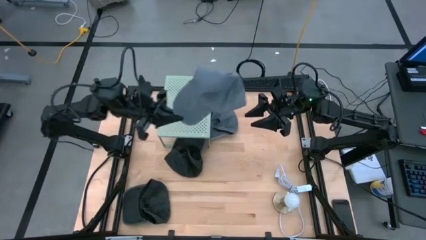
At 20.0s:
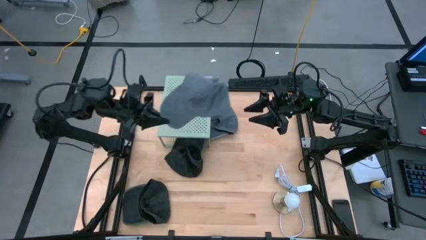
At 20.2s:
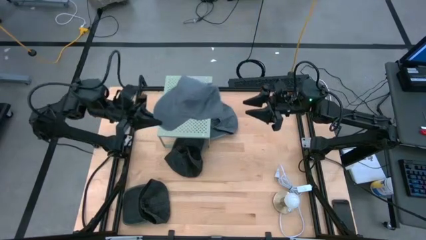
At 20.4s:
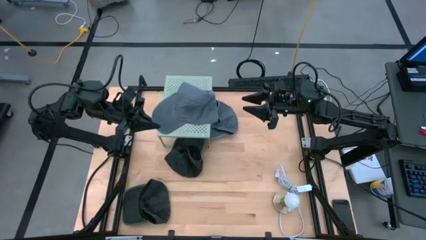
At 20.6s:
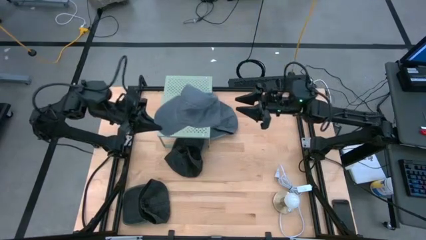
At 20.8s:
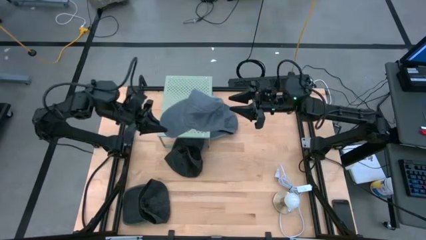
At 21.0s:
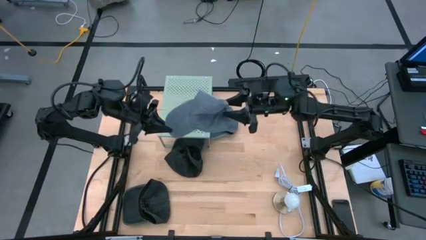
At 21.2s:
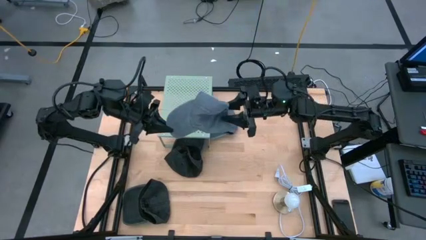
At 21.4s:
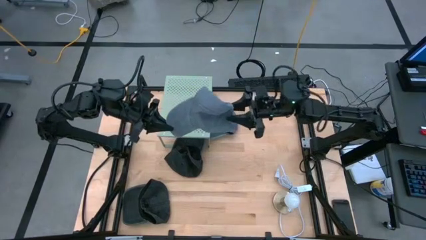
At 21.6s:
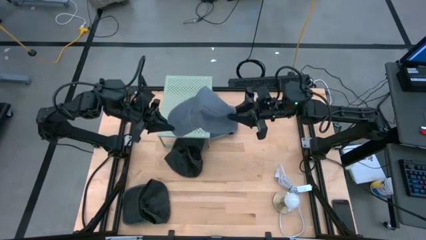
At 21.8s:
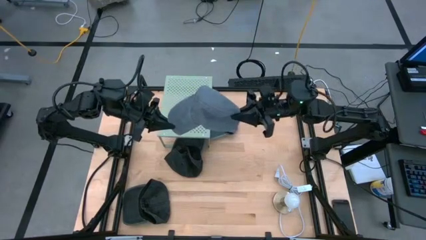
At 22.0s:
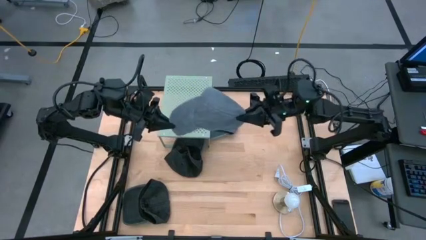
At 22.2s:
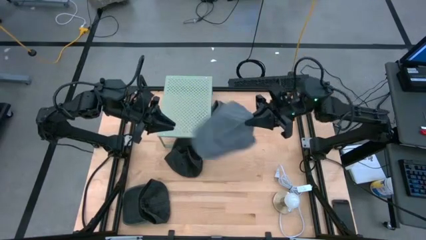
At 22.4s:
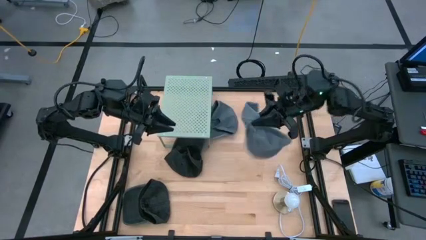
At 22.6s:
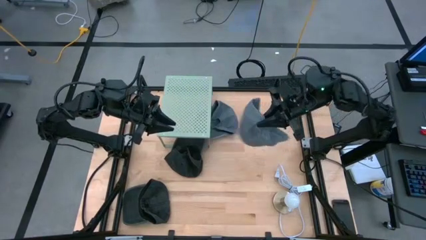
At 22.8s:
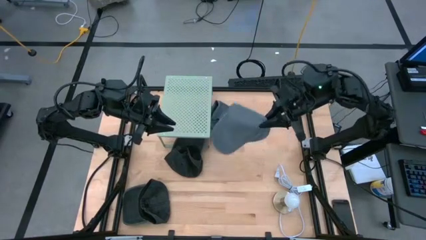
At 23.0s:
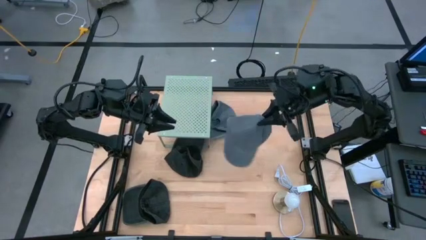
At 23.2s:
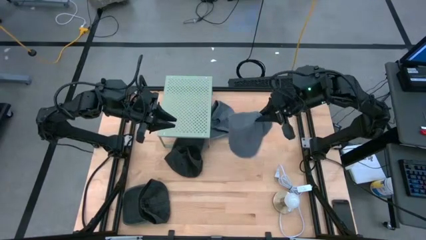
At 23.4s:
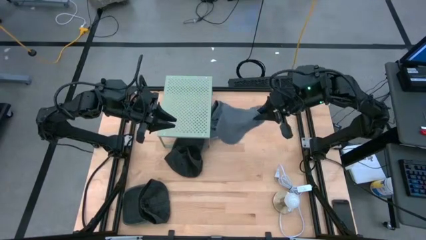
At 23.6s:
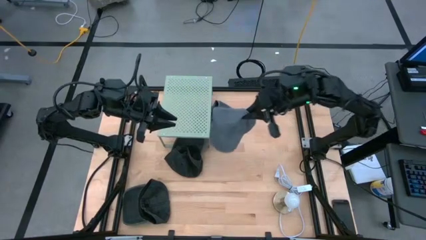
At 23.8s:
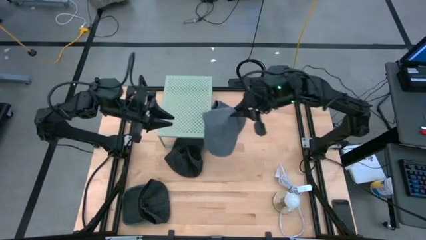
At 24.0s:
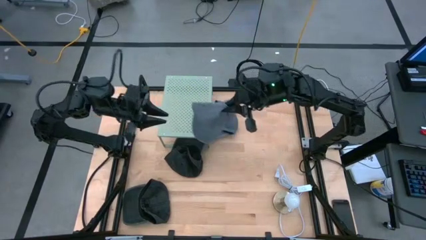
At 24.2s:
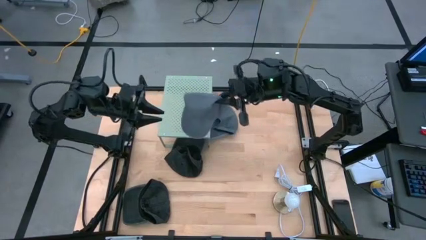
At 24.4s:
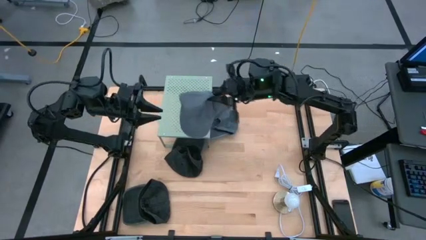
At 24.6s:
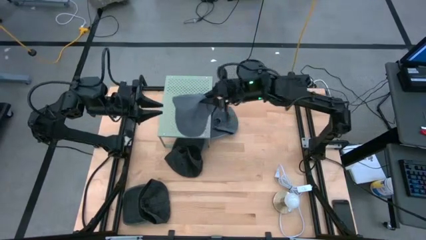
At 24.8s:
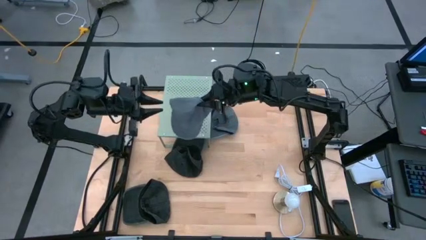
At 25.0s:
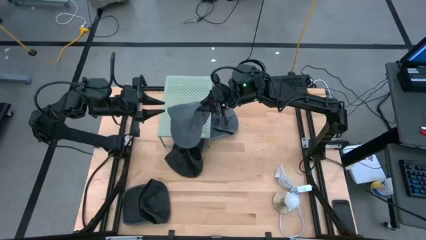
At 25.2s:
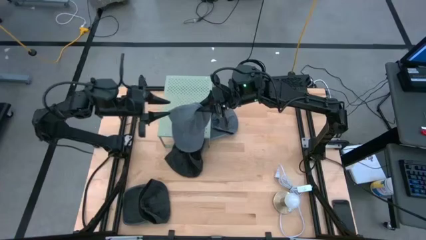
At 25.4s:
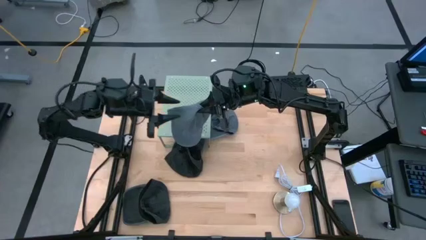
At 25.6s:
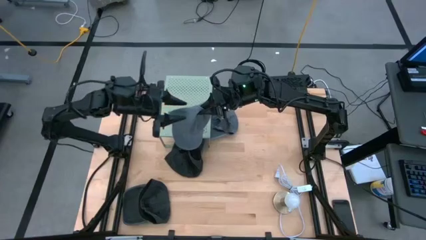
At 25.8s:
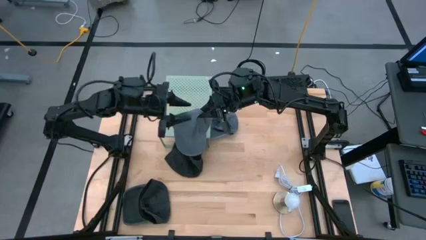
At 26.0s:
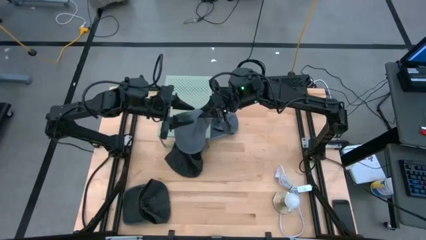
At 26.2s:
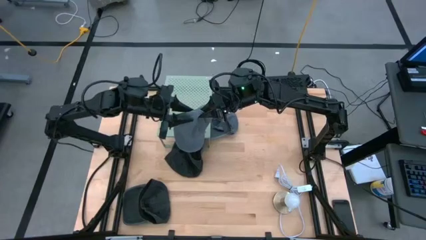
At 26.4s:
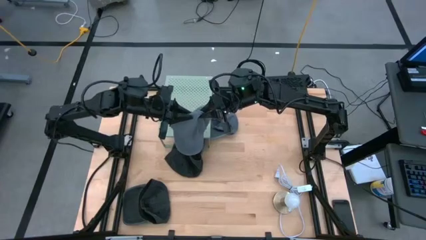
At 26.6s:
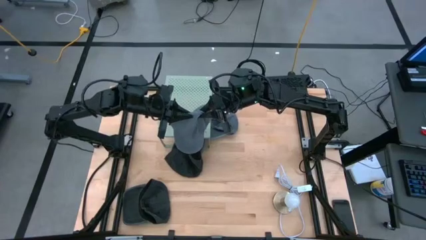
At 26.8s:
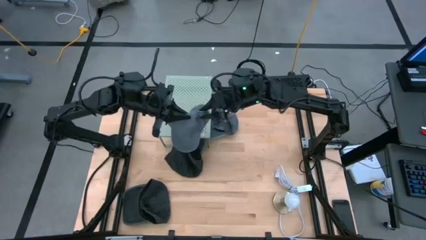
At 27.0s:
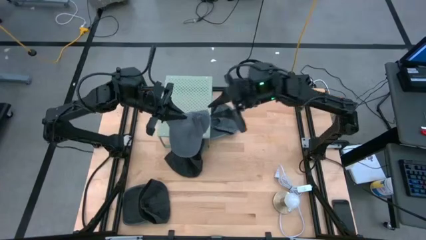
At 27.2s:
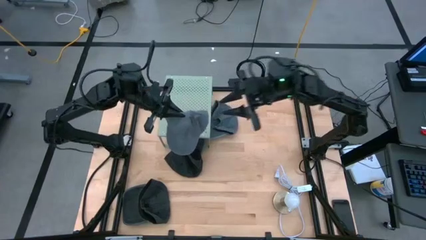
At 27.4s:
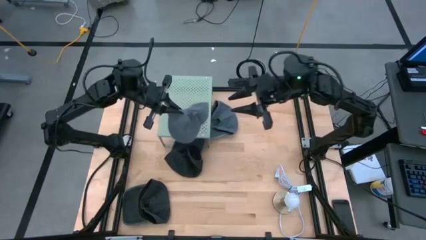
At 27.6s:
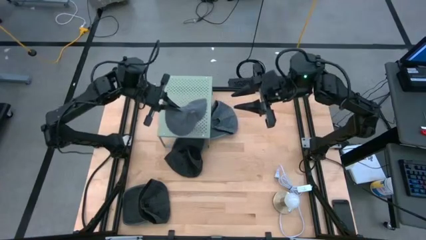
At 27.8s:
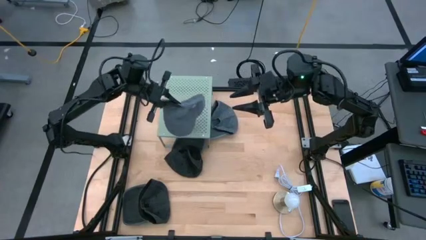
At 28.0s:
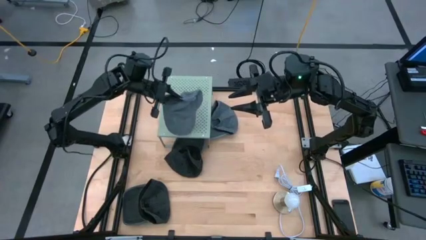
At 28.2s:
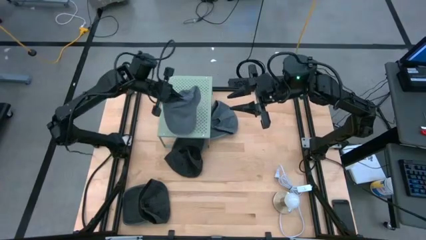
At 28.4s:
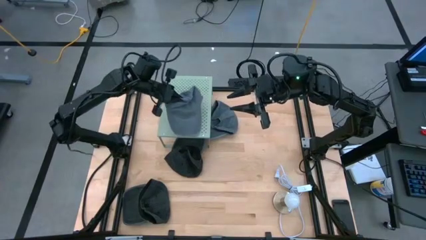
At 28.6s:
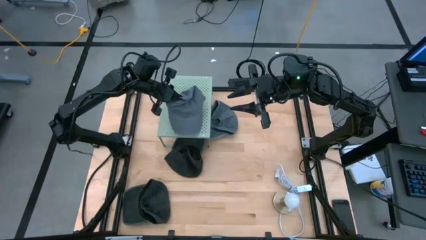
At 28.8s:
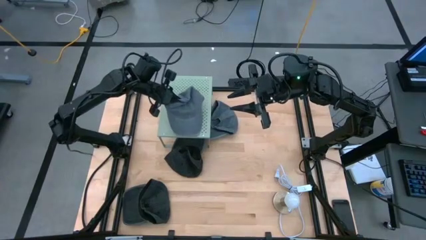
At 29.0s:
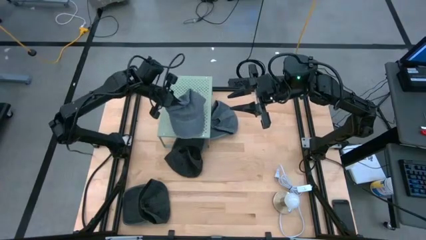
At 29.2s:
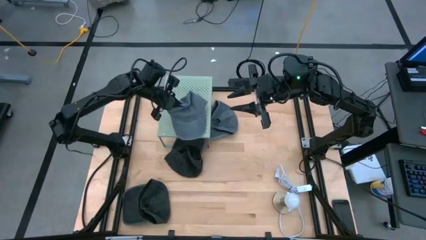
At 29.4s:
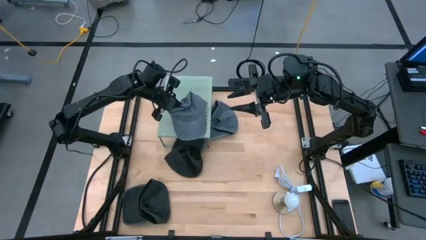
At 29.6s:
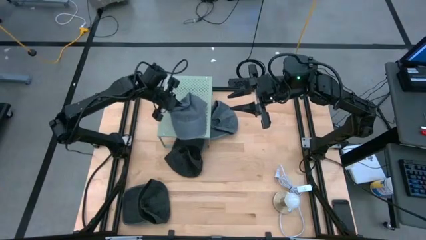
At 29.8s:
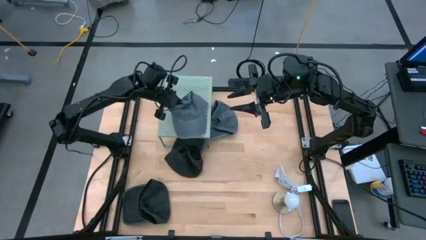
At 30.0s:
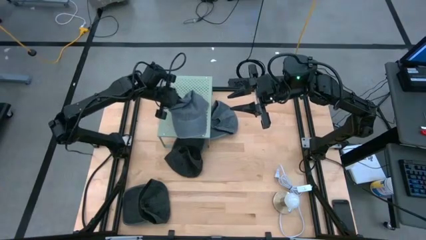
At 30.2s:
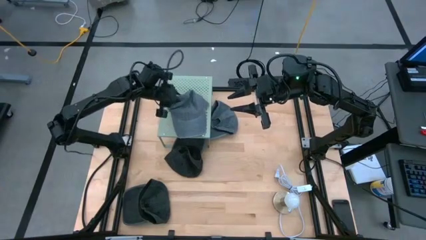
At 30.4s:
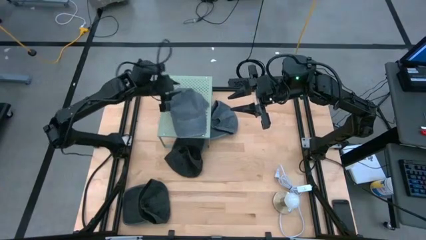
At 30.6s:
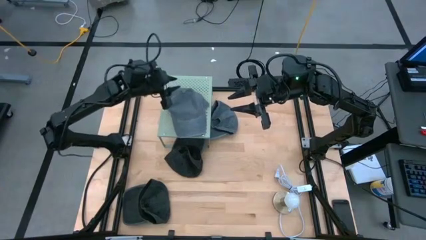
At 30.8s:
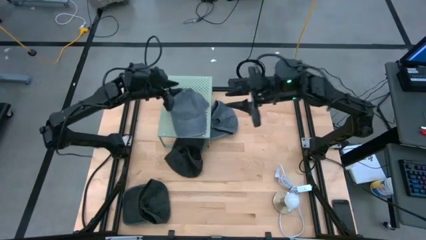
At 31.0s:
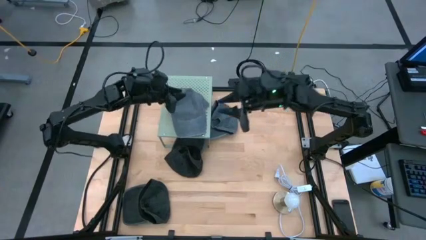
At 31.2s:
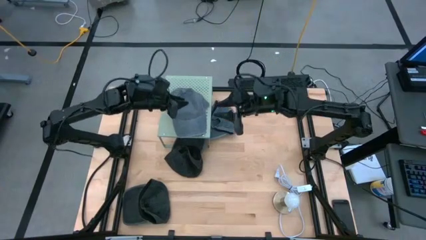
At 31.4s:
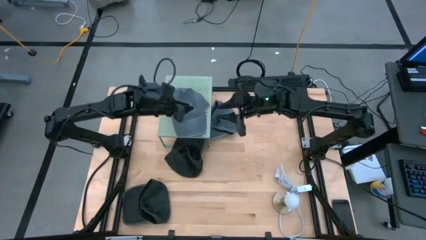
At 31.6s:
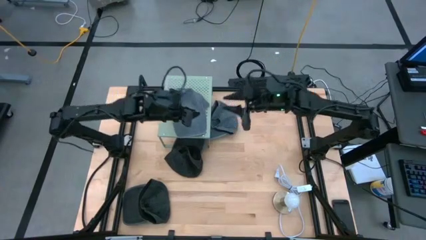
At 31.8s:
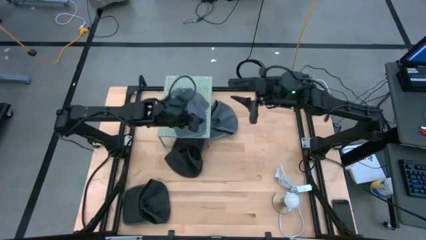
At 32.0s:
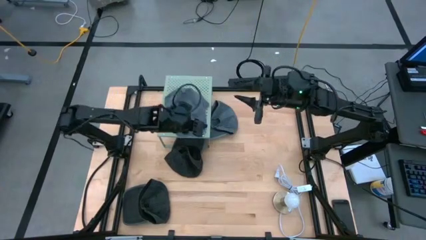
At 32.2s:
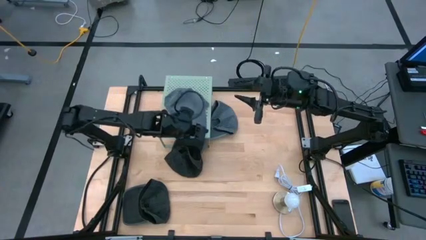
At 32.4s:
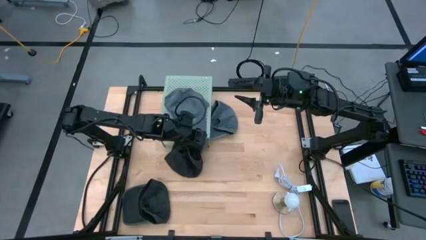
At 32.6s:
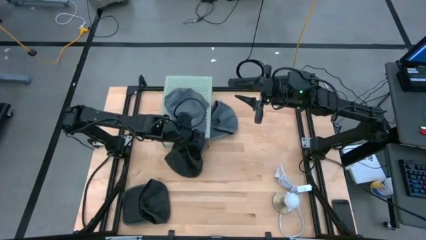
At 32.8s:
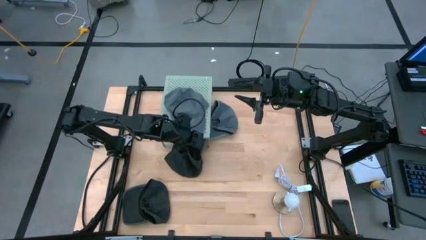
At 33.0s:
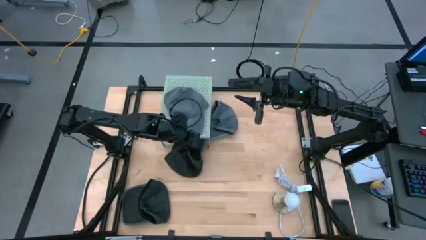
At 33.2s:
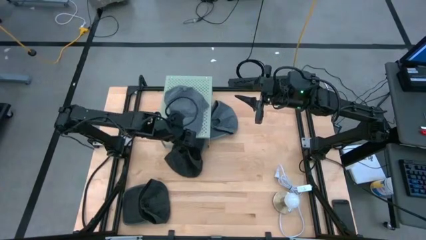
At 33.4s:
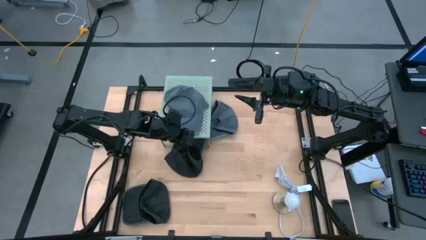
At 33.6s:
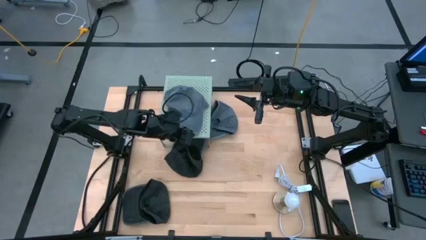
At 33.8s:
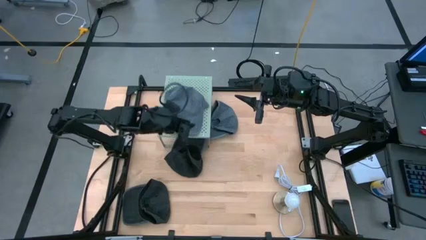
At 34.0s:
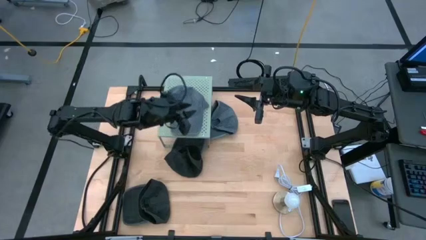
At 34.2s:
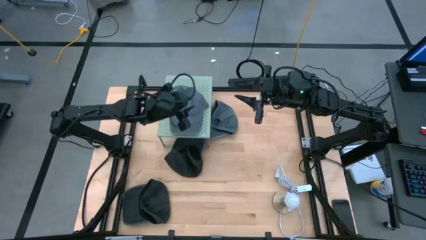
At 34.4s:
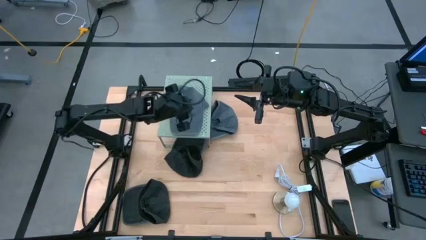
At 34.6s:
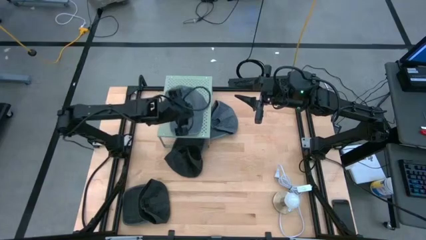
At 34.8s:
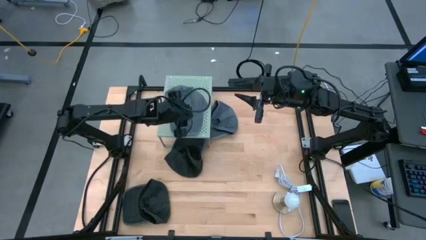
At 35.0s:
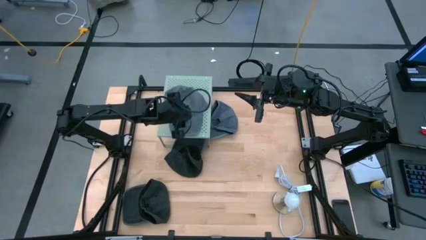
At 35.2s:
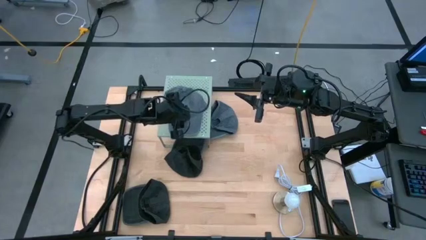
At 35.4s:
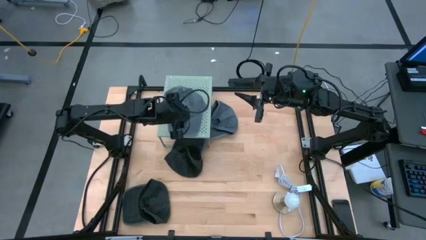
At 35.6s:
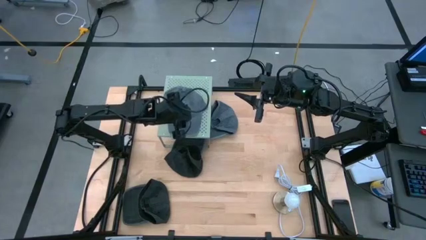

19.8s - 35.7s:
Task: Pick & Place hat
Put the right gray cap on the shelf
